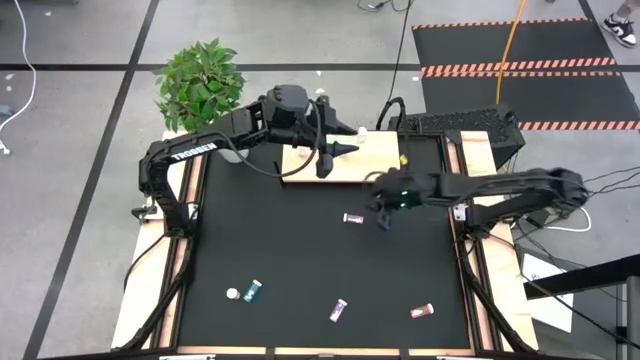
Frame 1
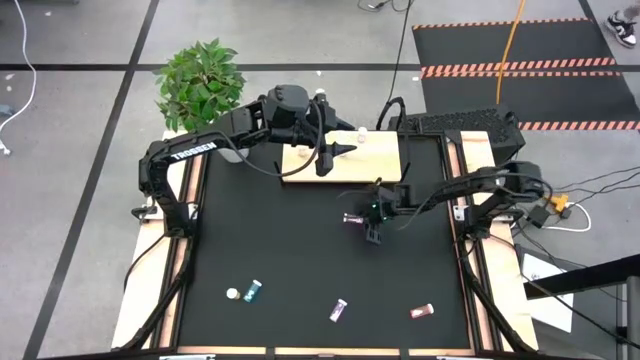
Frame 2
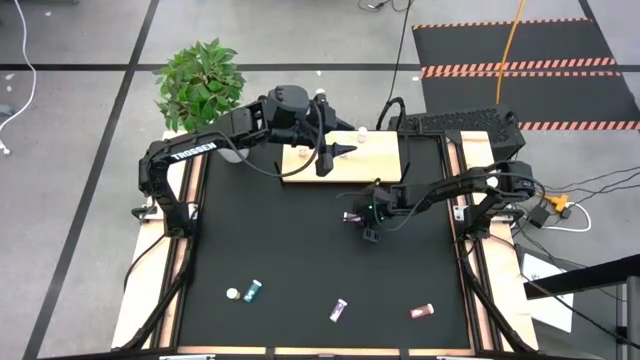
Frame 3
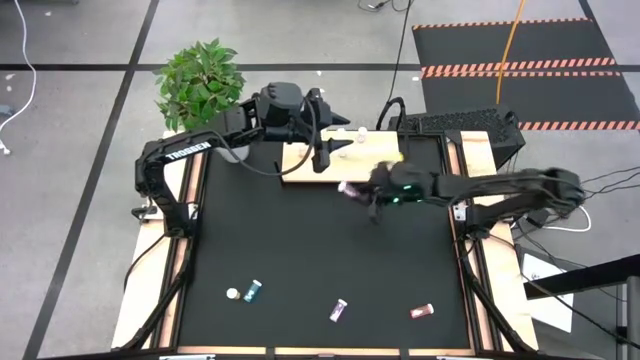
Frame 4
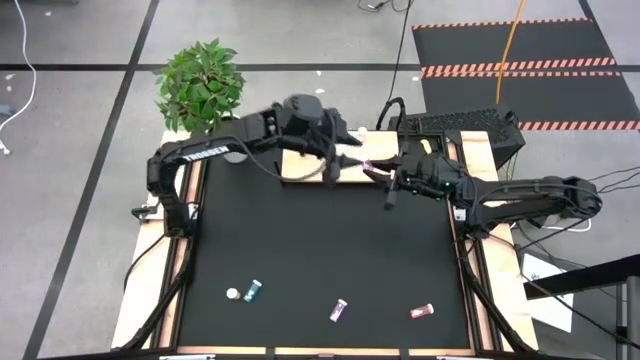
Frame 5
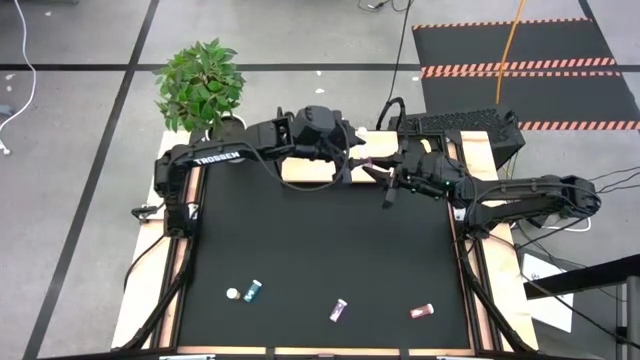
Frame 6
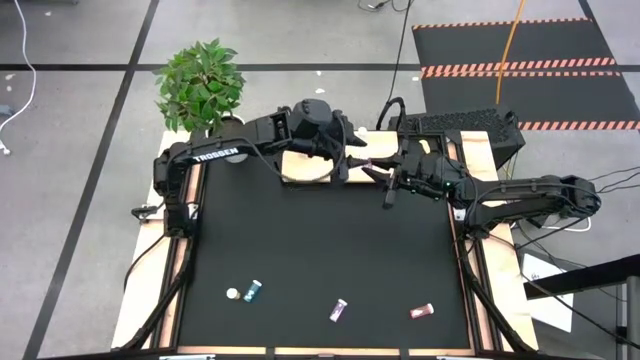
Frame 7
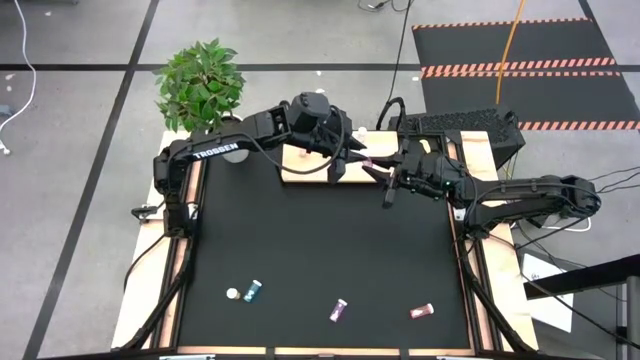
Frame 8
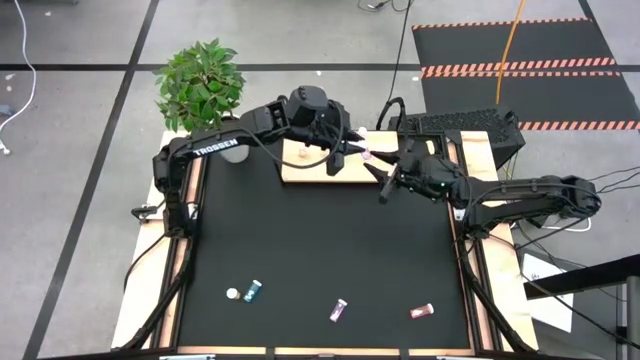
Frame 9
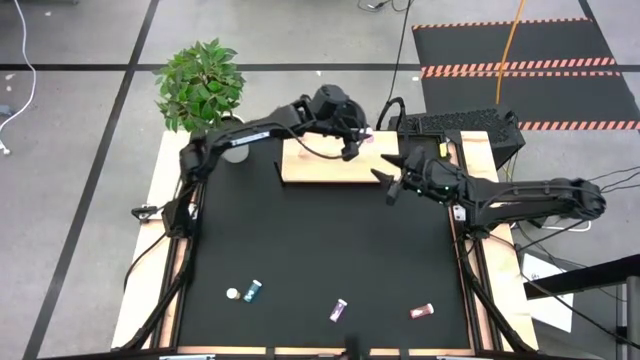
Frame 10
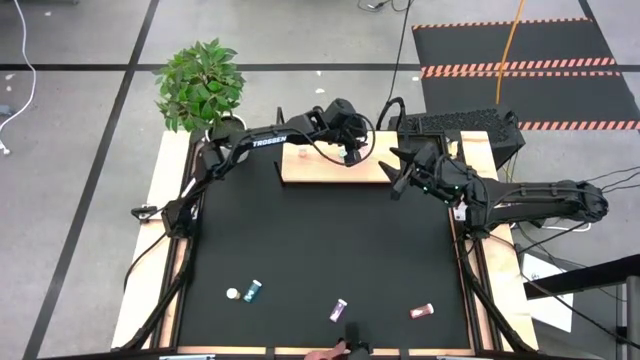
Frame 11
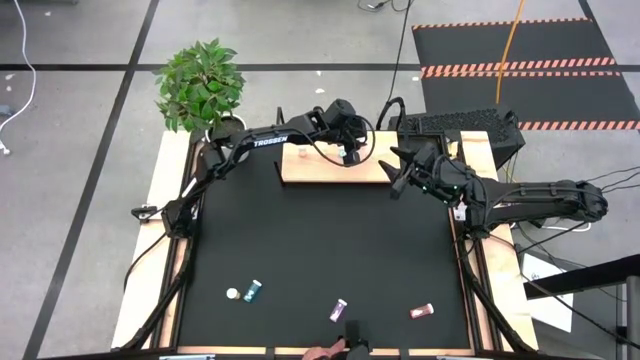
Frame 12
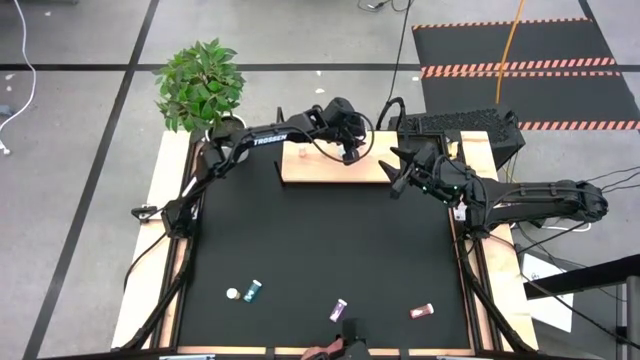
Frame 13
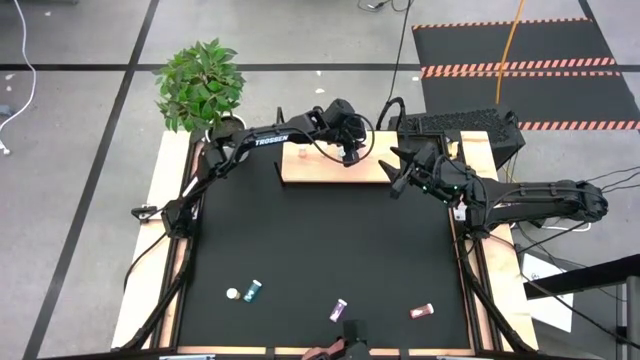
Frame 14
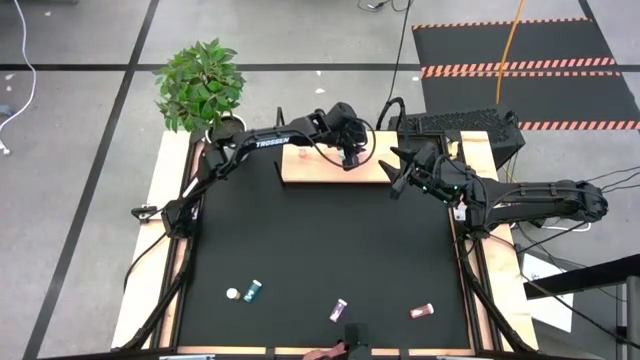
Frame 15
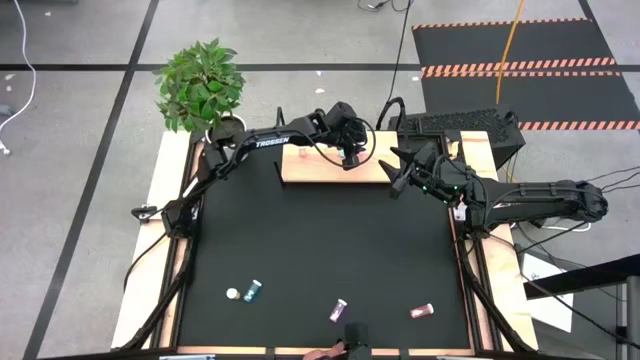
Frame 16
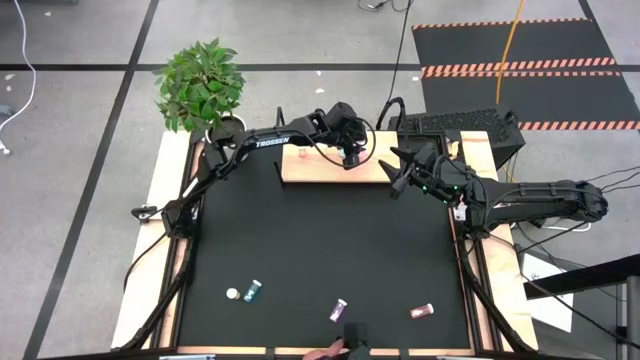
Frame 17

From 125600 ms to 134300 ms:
Task: Pick and place medicine bottles onto shelf by color
Put the top violet pill bottle on the shelf aligned with the other violet pill bottle

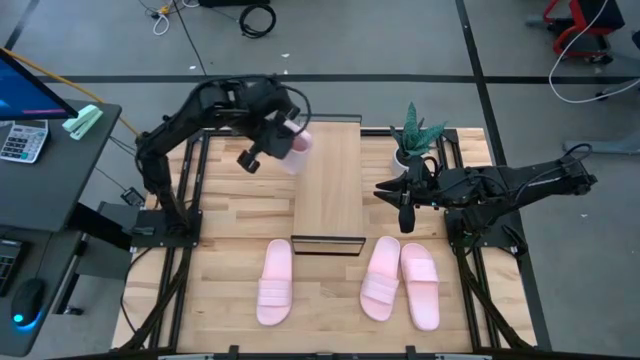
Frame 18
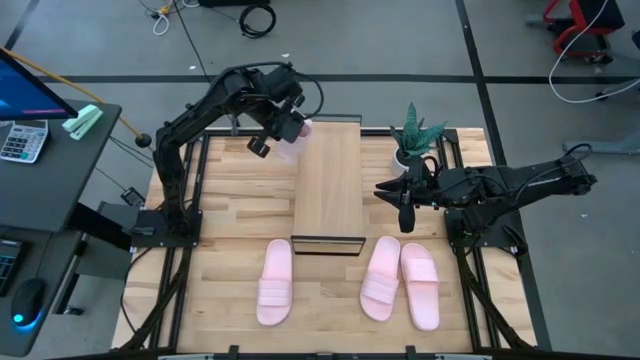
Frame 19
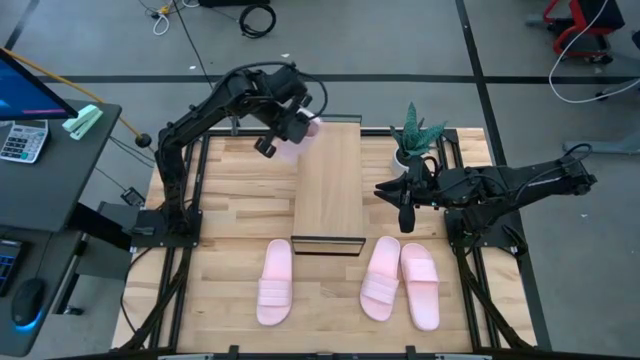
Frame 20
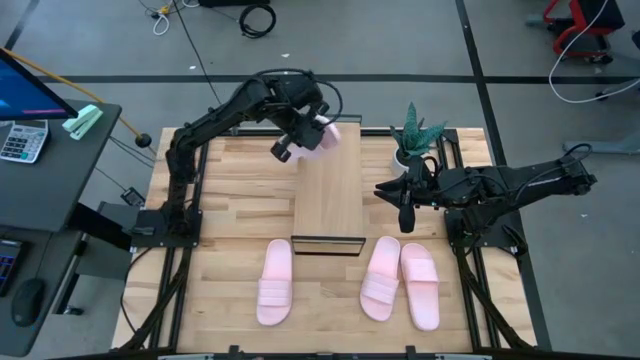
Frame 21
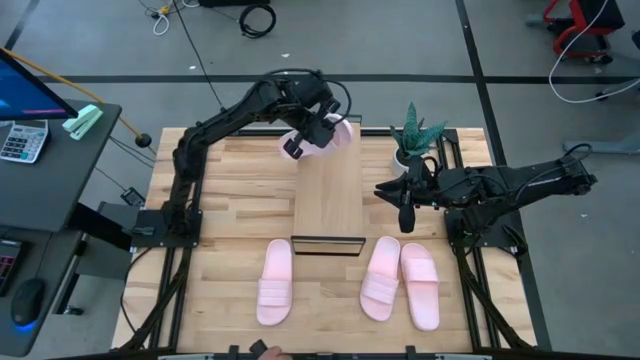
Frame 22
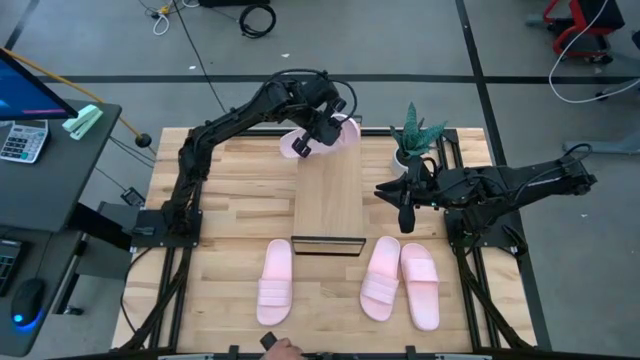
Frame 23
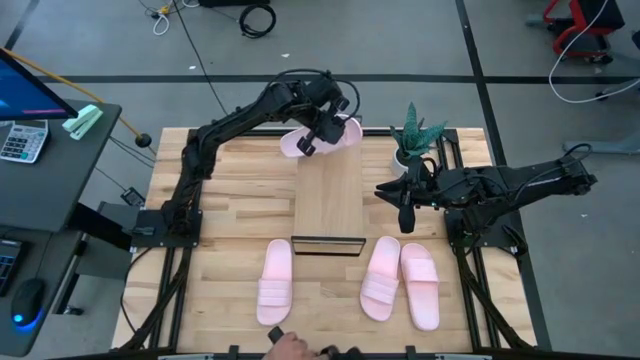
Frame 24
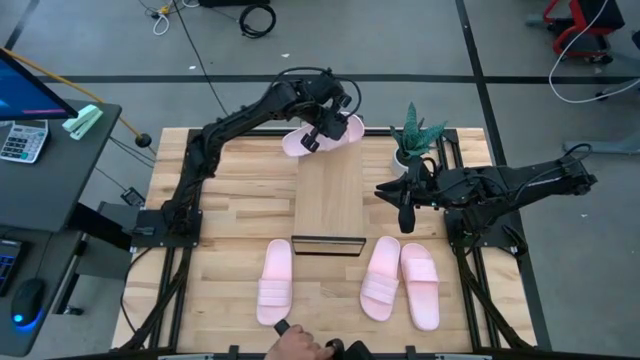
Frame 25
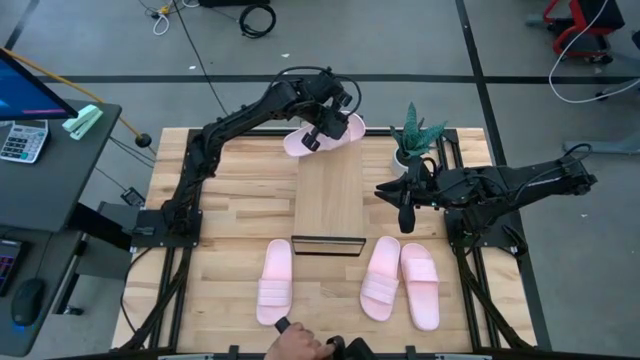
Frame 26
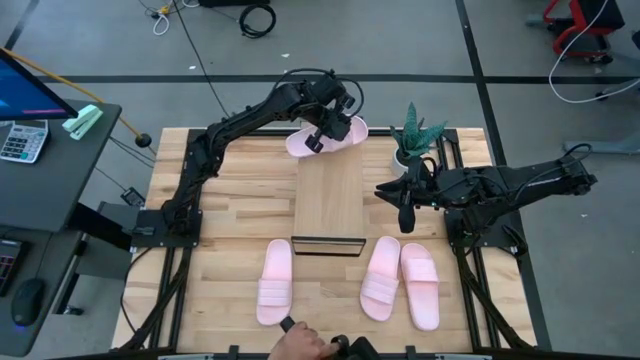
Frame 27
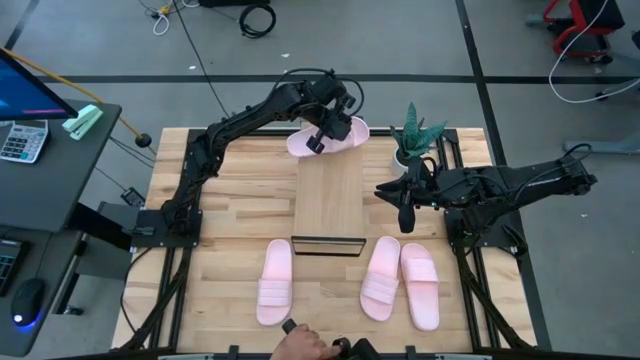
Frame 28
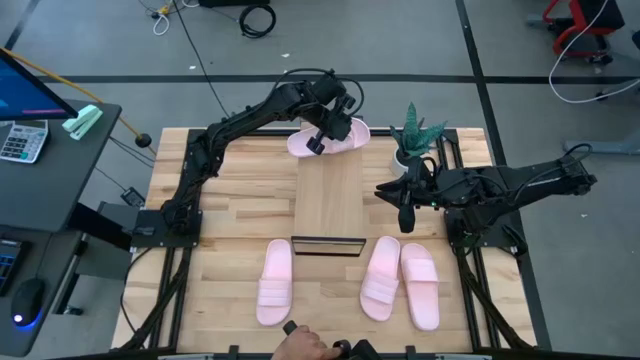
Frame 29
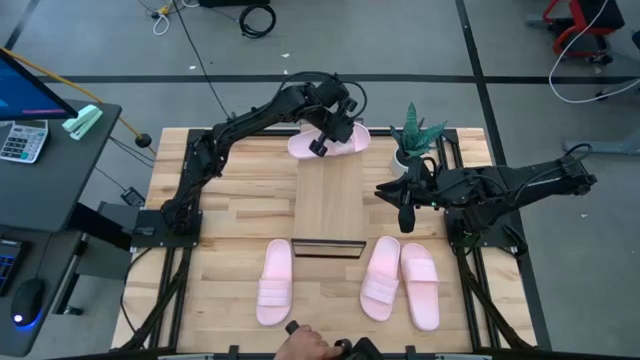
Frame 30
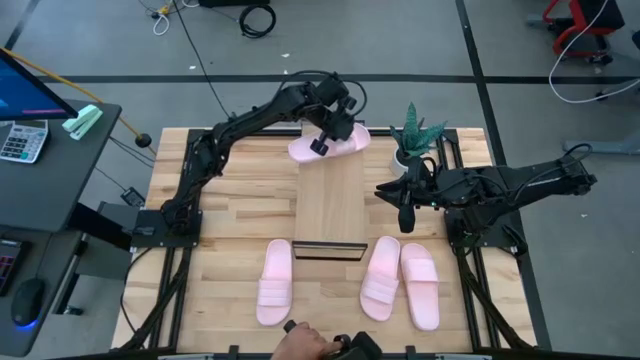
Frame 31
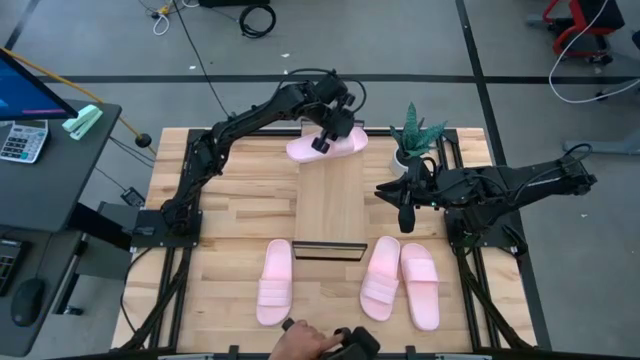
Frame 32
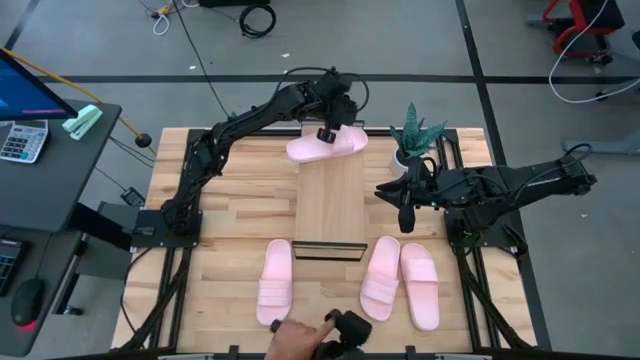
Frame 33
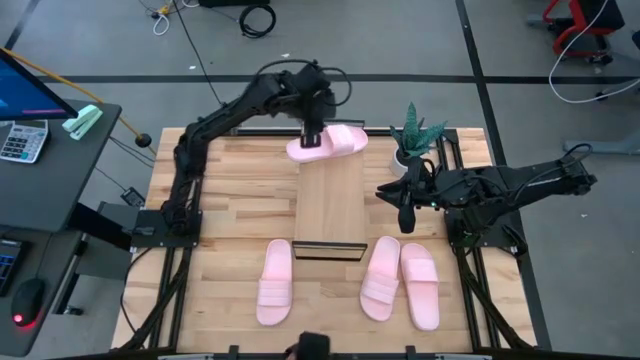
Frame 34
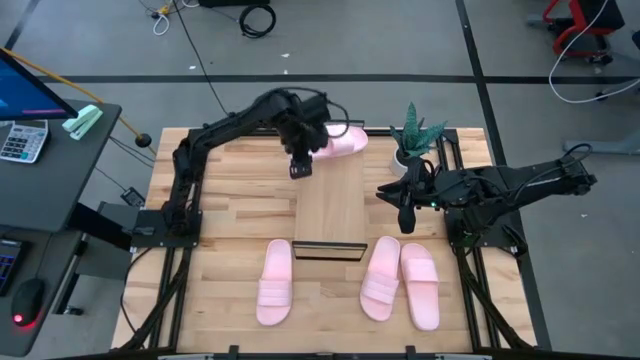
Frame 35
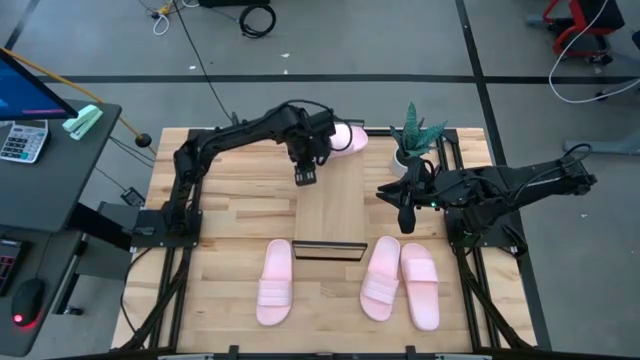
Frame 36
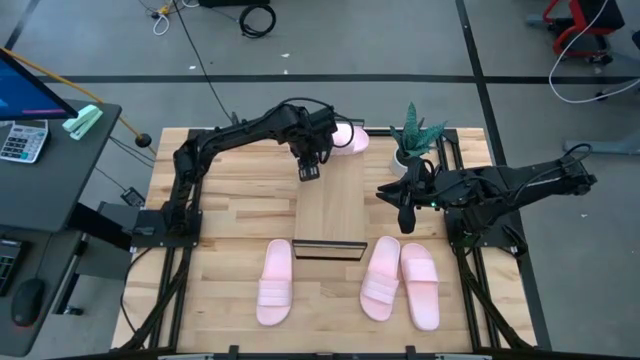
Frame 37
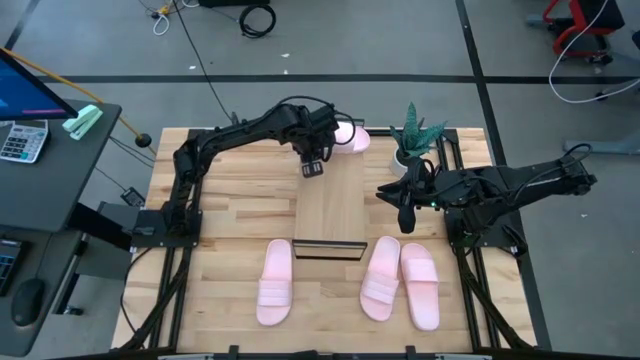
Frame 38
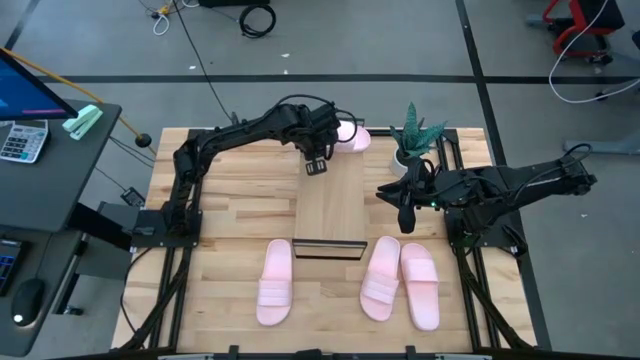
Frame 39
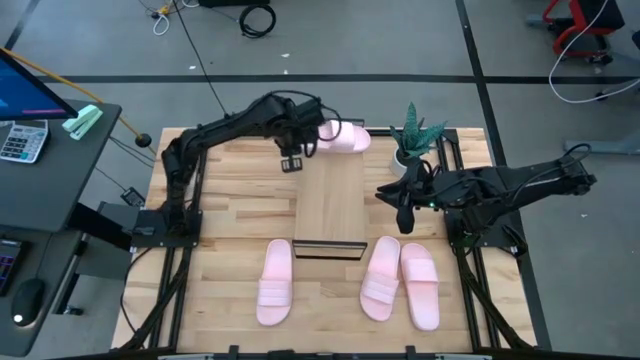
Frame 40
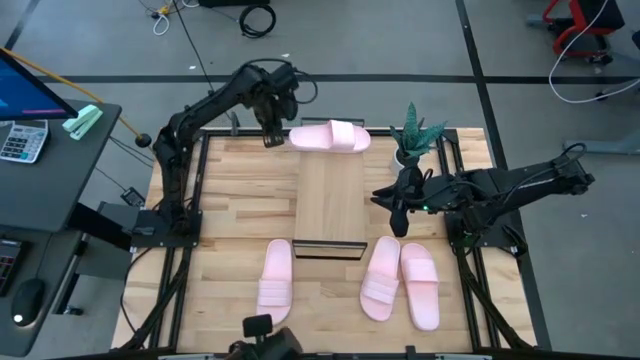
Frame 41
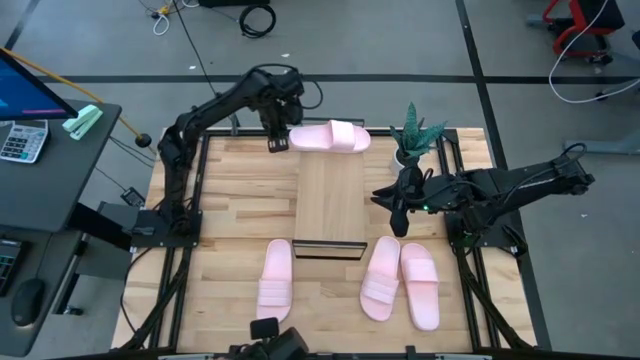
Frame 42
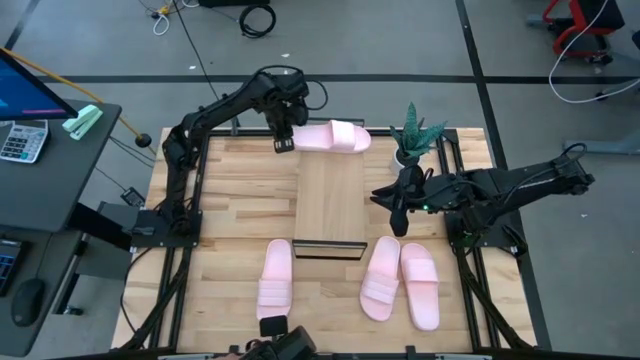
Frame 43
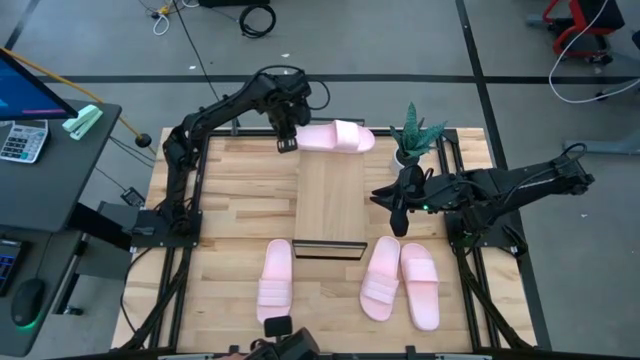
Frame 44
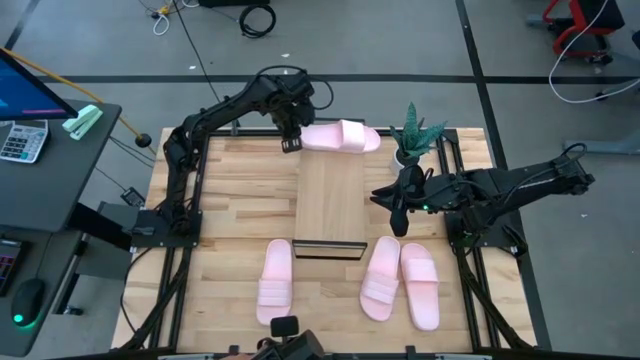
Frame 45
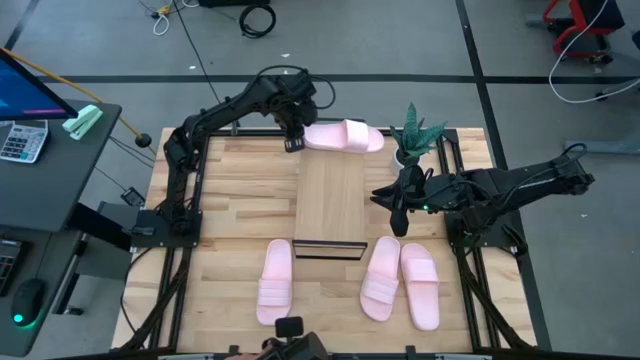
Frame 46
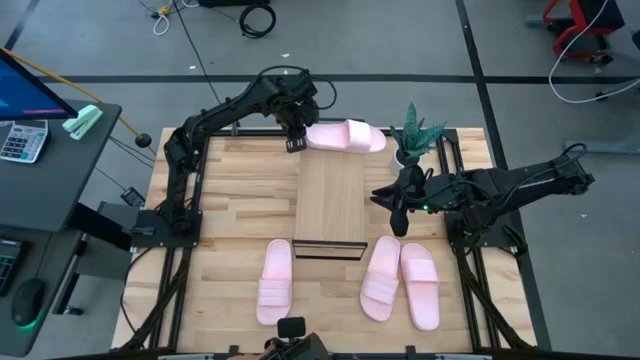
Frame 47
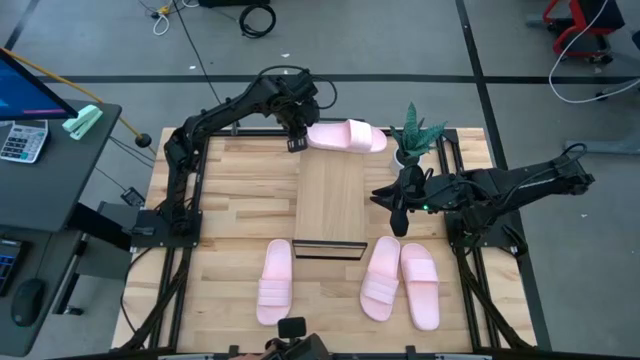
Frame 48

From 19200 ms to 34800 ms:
Task: Pick and place slides into the shelf
Put the pink slide on the shelf
